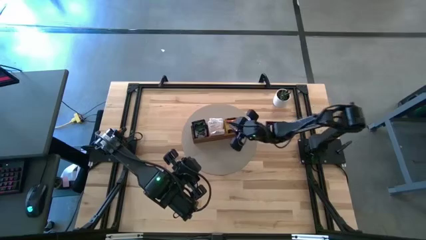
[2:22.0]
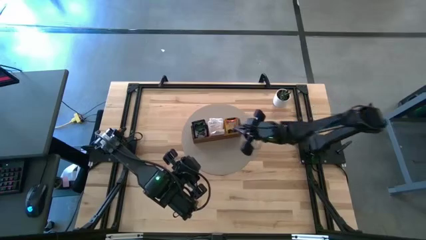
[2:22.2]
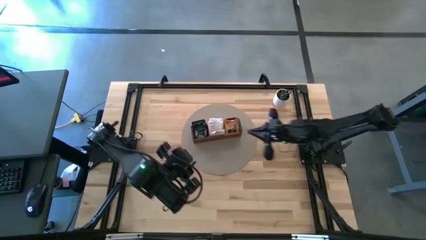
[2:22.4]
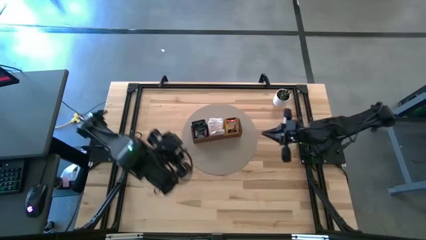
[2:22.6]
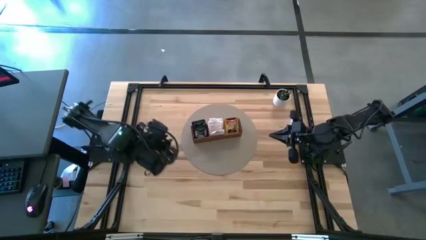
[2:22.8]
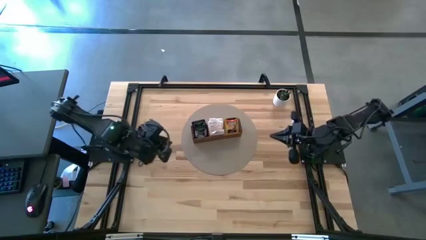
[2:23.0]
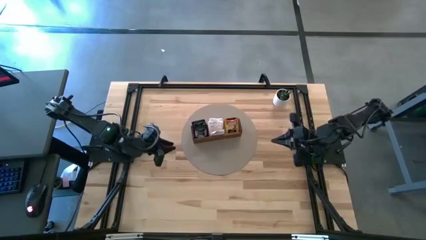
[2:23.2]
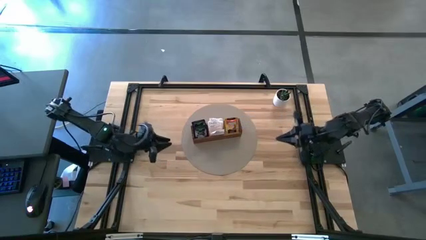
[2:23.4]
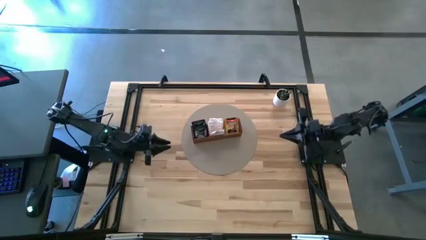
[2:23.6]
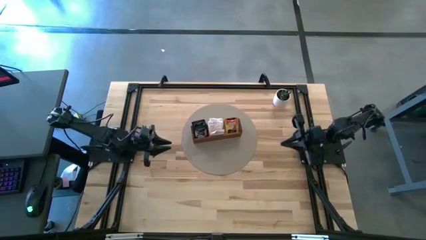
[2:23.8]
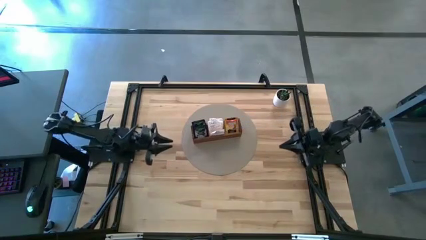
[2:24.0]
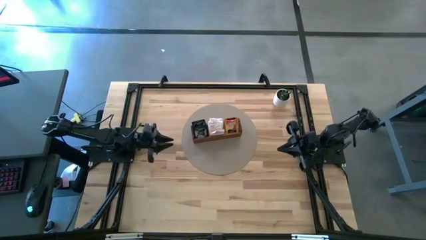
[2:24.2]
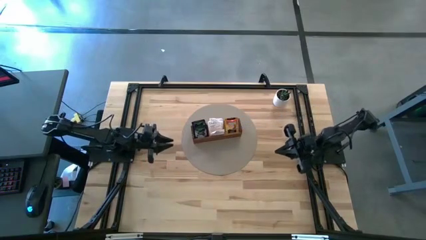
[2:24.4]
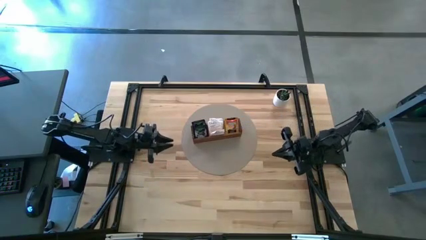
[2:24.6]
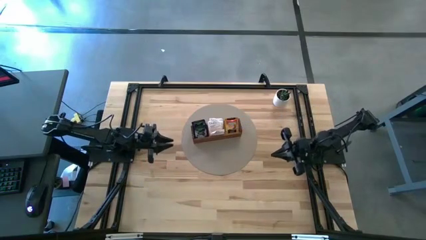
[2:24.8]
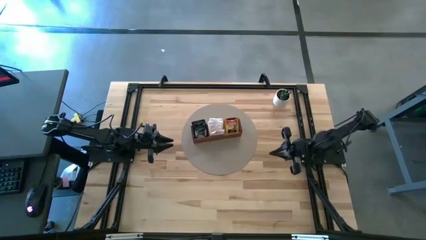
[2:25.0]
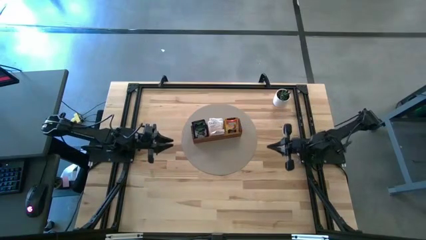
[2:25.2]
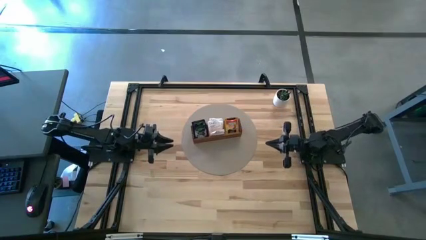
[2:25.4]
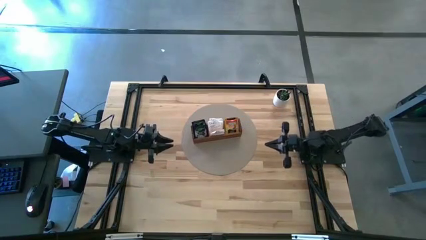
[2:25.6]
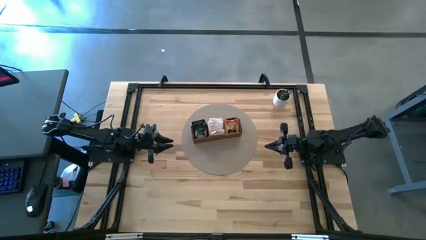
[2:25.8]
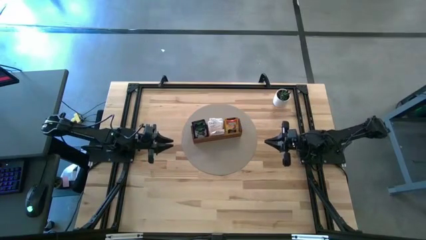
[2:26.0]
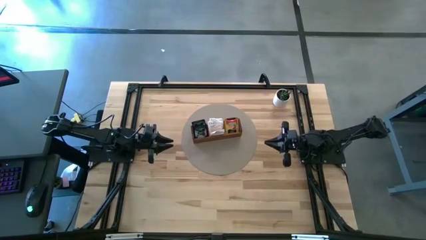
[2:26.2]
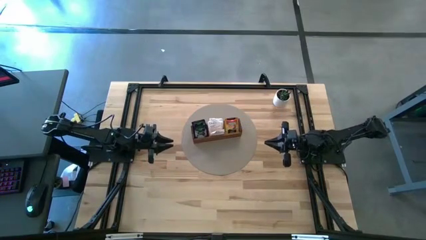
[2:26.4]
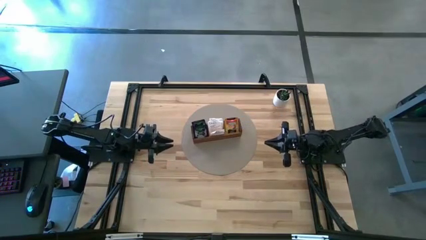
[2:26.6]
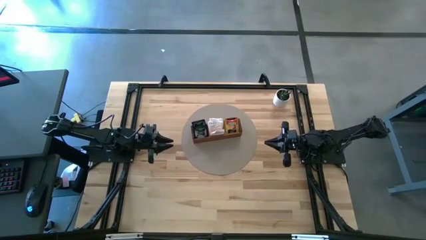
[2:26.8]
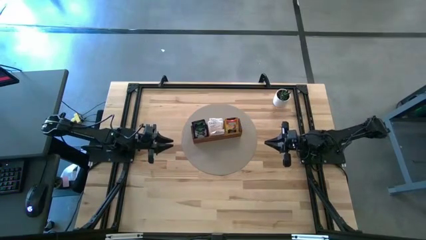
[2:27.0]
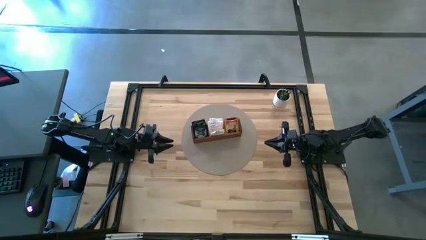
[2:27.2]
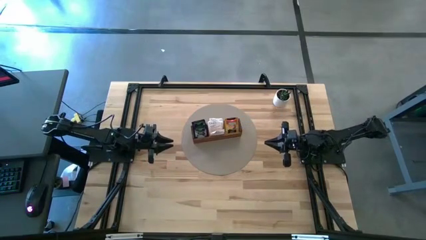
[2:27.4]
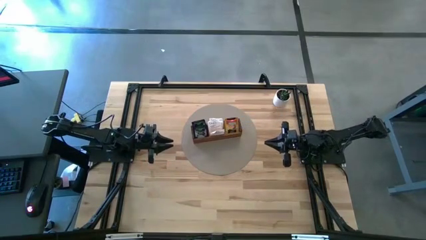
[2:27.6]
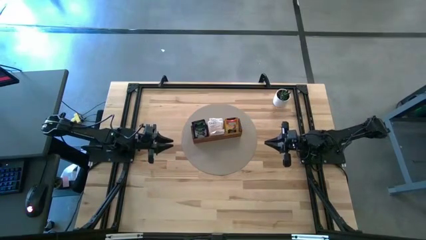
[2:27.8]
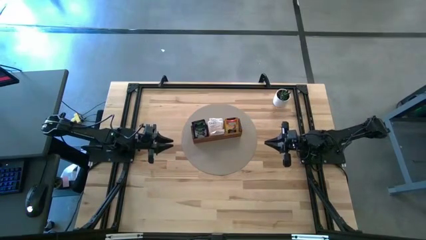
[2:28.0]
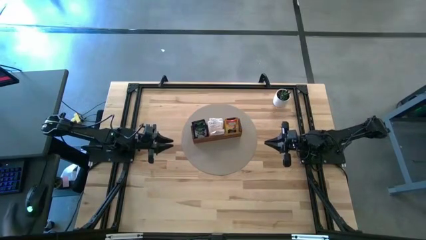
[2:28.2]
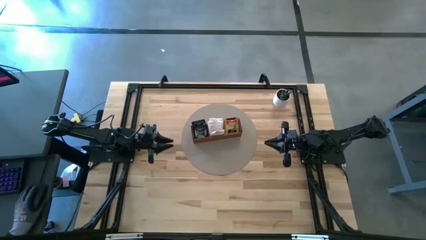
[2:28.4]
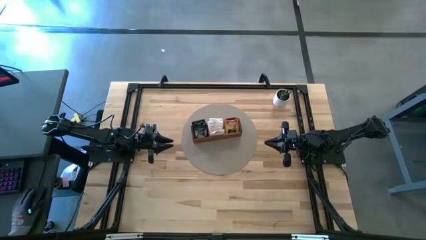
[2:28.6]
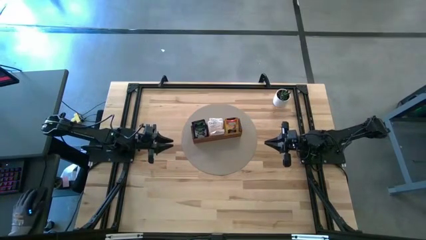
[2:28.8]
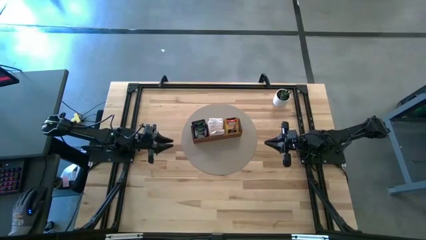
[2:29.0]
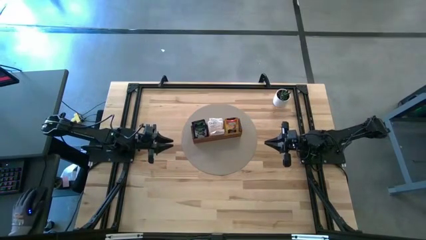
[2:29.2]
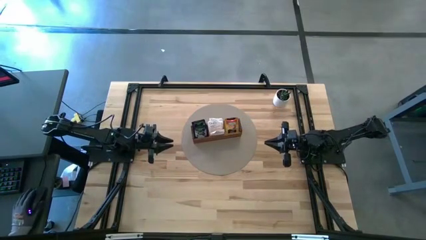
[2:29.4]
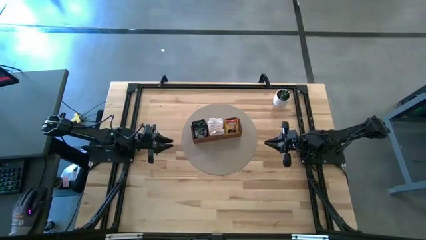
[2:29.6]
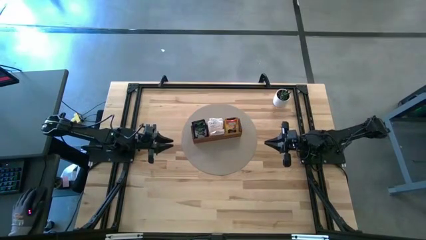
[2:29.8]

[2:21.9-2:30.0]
Task: Pick & Place Tea
Return to Home Position

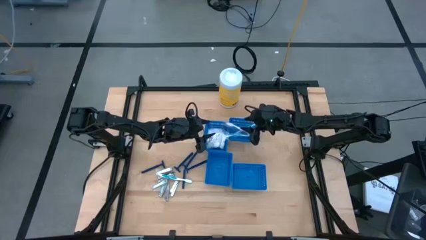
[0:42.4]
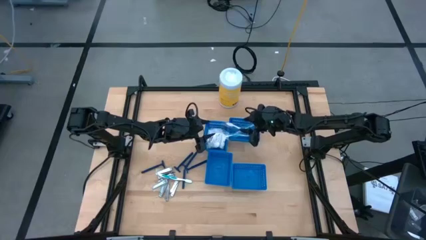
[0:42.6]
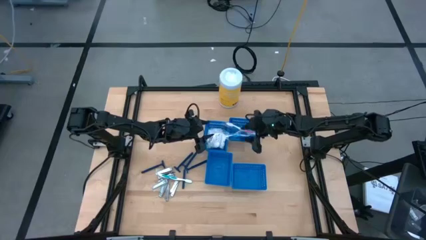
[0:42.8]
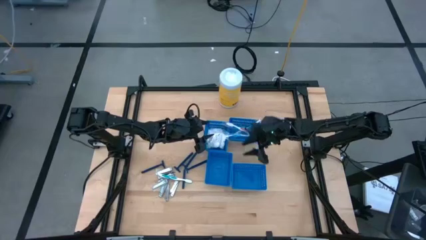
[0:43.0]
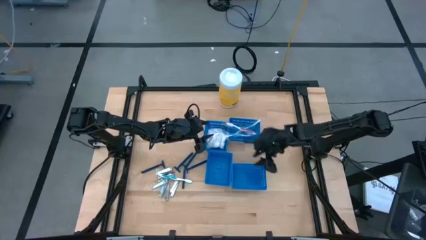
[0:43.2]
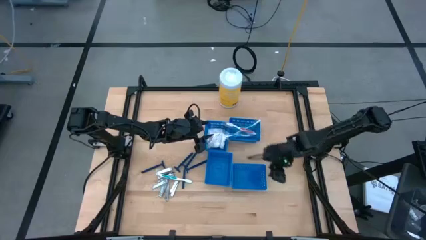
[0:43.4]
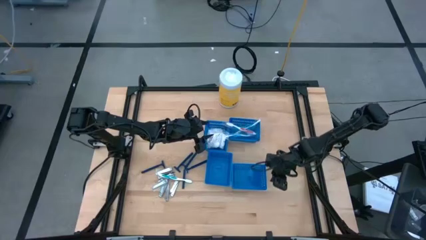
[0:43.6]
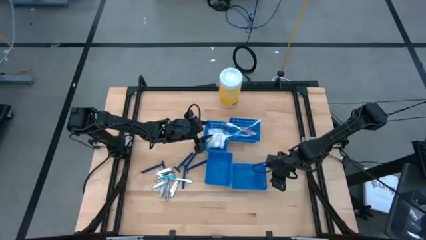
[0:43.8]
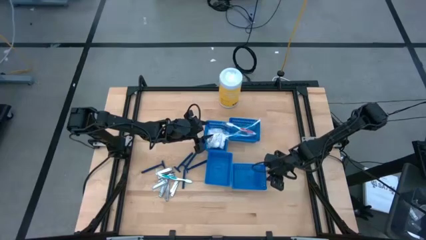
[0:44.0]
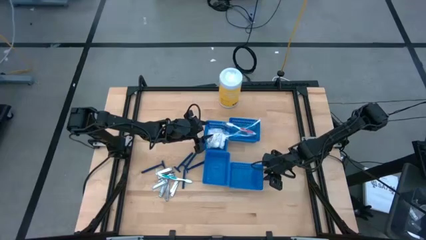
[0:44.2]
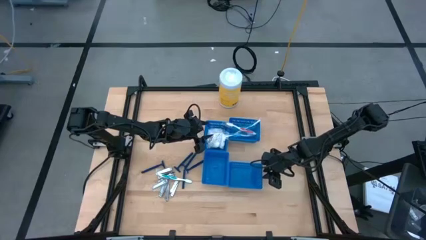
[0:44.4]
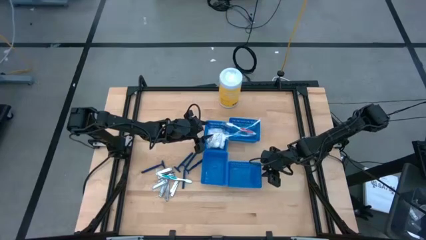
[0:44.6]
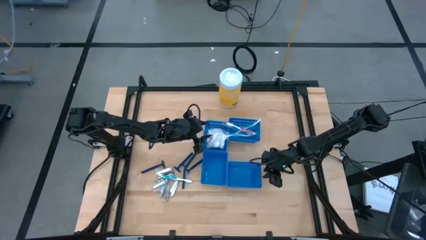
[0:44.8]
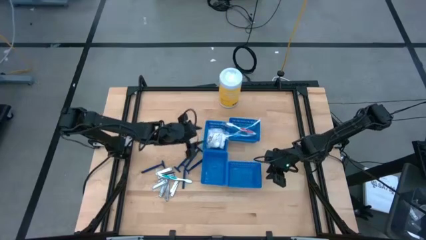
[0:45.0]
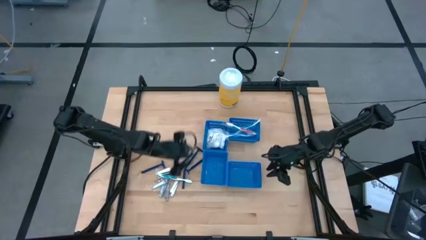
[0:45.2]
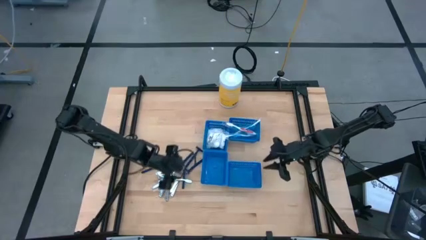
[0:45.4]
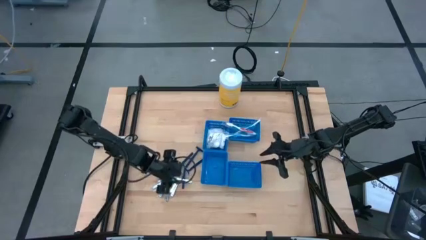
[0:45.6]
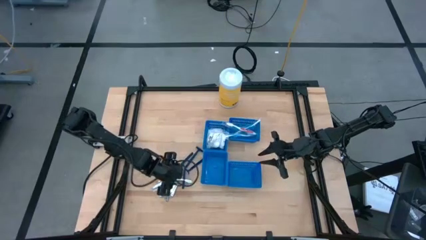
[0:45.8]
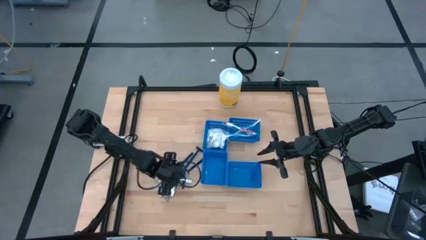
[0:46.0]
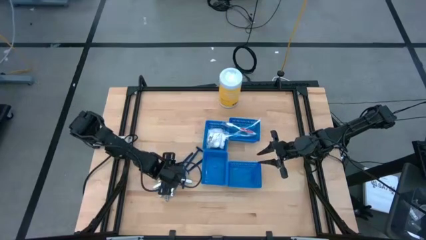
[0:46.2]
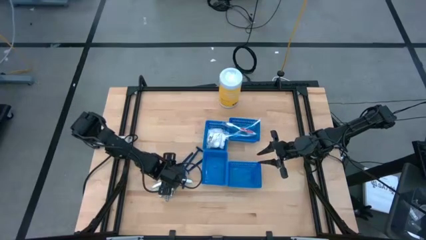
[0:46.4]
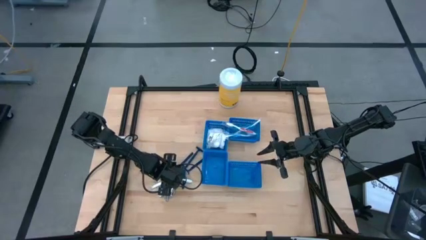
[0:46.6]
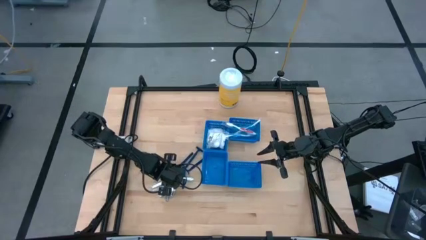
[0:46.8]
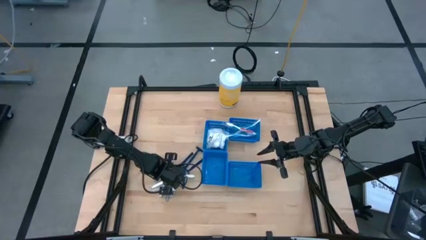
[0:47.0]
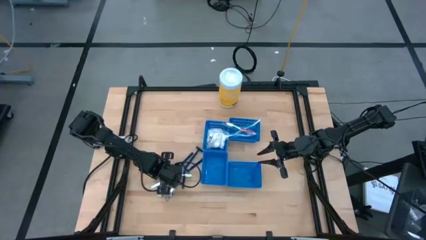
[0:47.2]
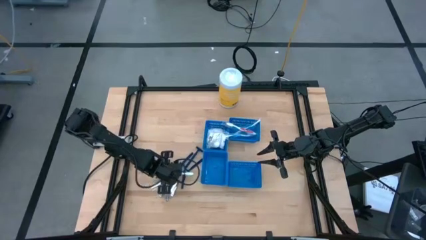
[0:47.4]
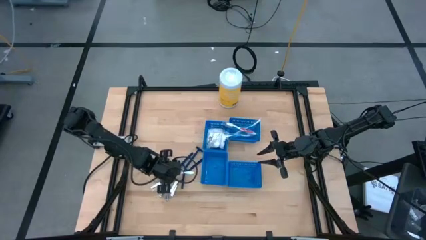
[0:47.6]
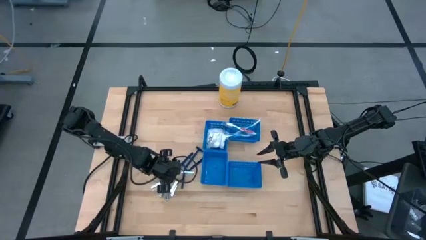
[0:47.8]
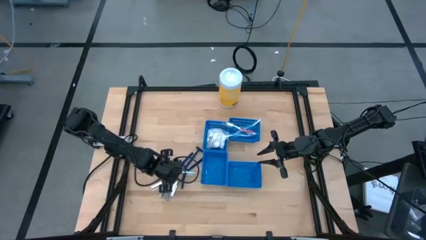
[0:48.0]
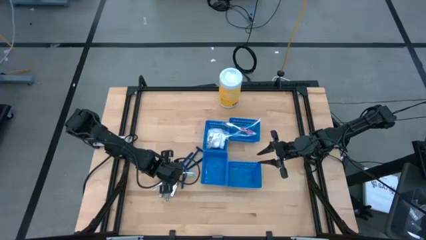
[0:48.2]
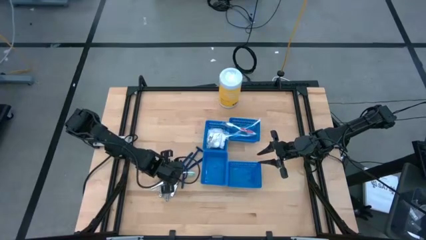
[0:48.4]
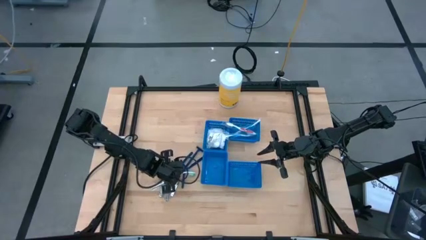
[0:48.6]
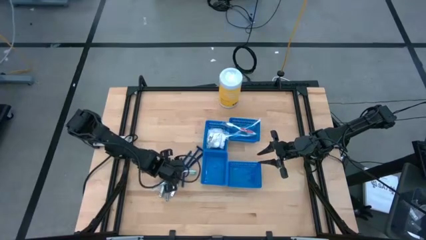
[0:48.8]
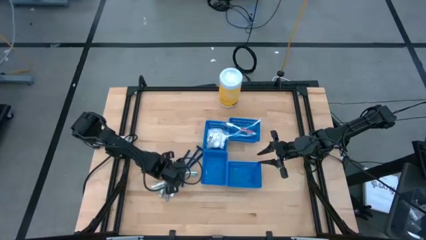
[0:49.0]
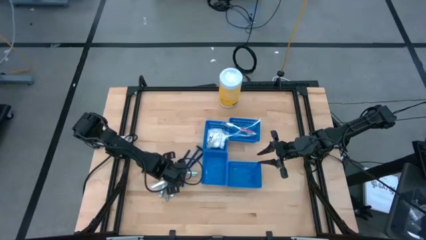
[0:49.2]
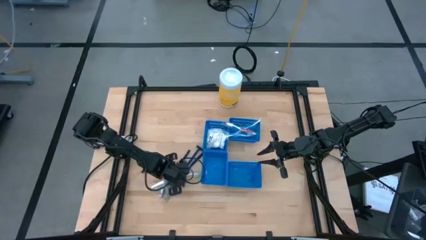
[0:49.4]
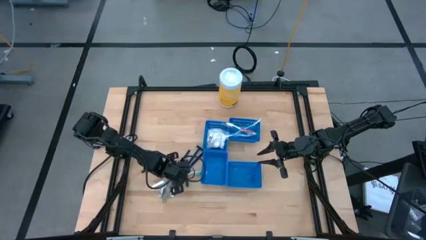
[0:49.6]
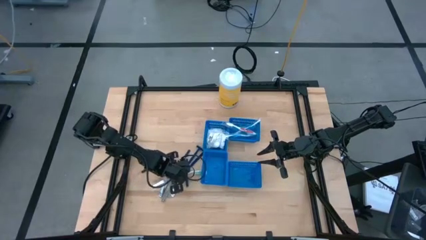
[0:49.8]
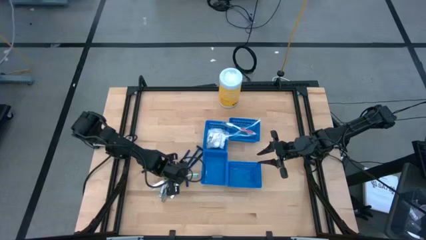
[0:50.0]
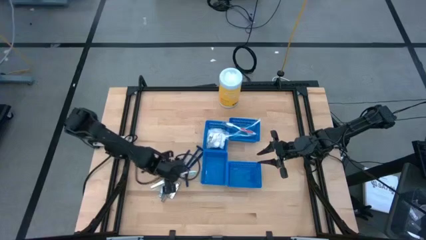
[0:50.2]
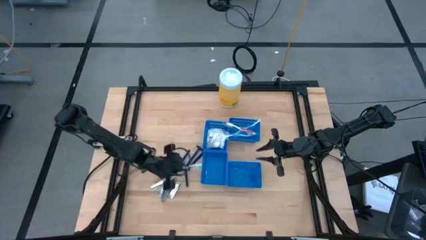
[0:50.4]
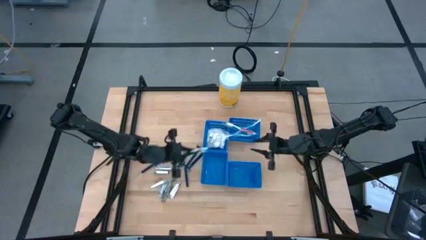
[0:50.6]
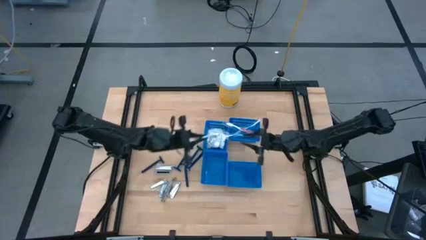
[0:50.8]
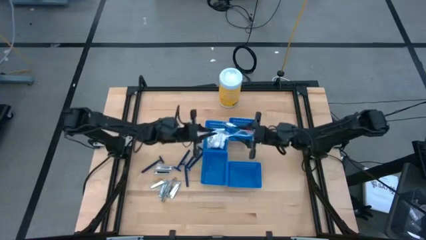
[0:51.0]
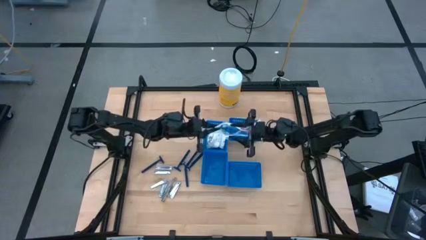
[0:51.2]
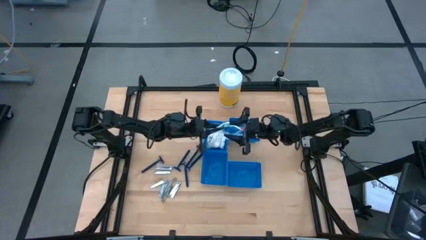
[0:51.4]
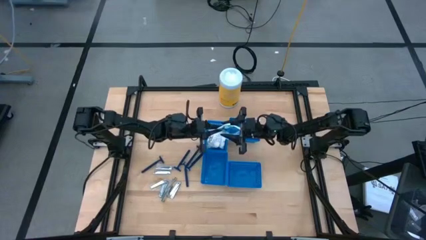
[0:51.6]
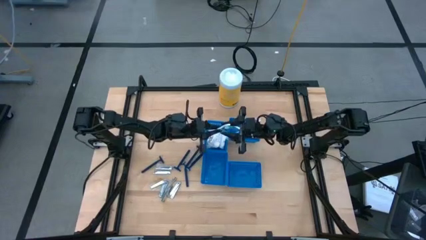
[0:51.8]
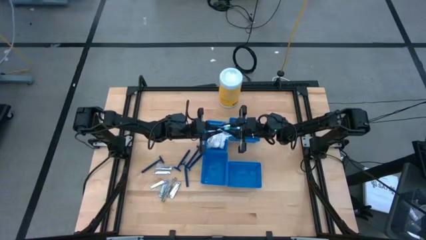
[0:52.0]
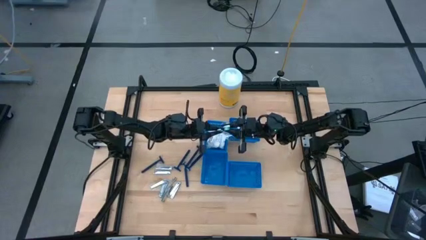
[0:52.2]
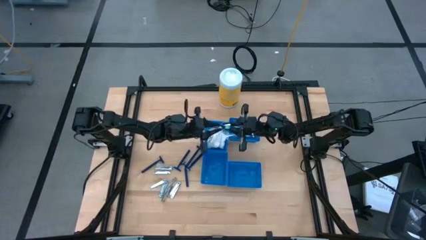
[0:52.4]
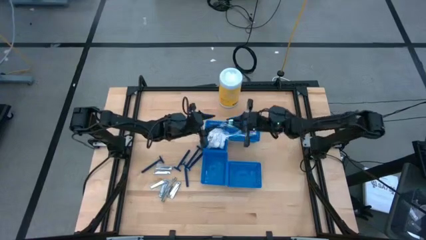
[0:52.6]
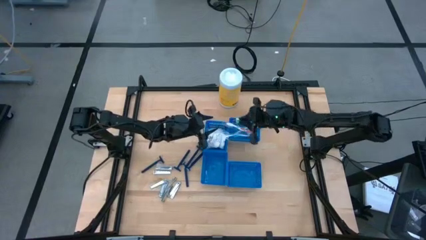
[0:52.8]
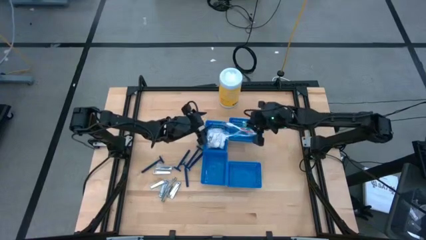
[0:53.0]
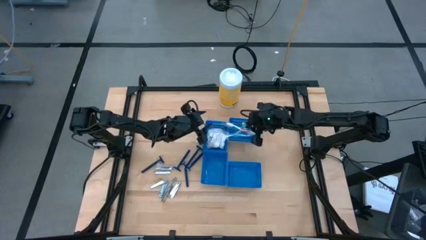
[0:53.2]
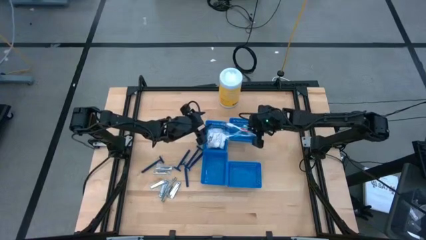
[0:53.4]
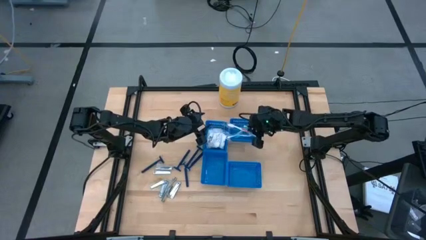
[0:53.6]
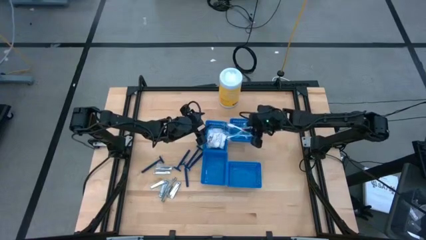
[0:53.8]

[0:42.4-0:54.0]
Task: Pick & Place Travel size toiletries
Put the green toothbrush into the top right blue bin
